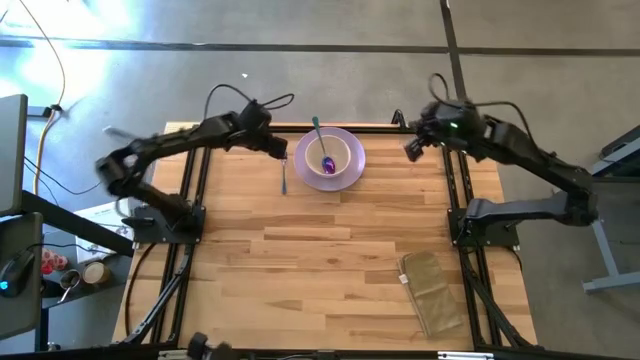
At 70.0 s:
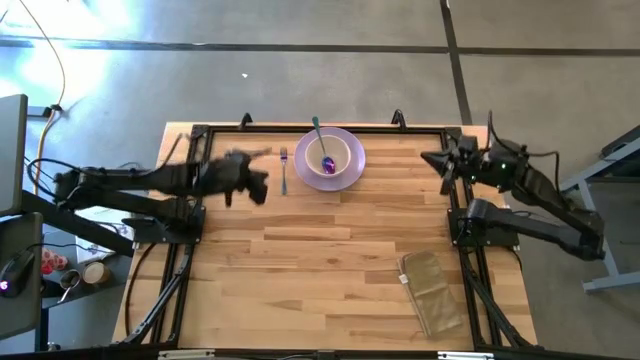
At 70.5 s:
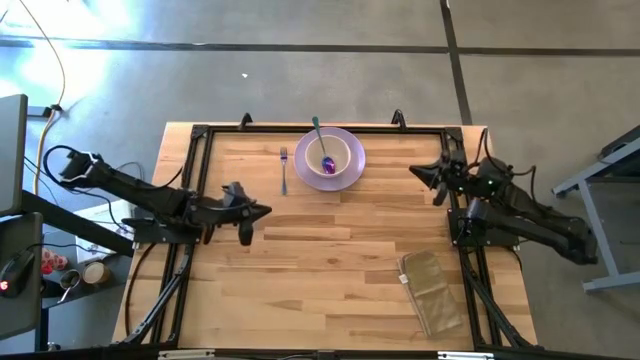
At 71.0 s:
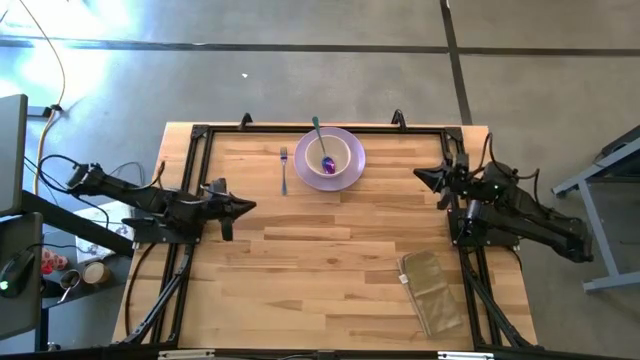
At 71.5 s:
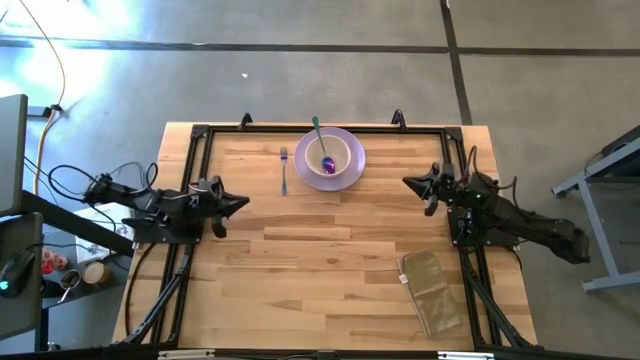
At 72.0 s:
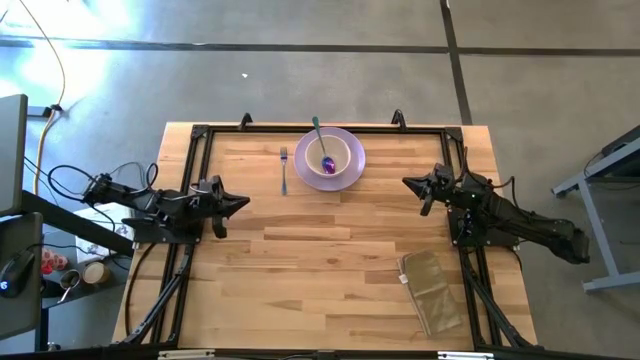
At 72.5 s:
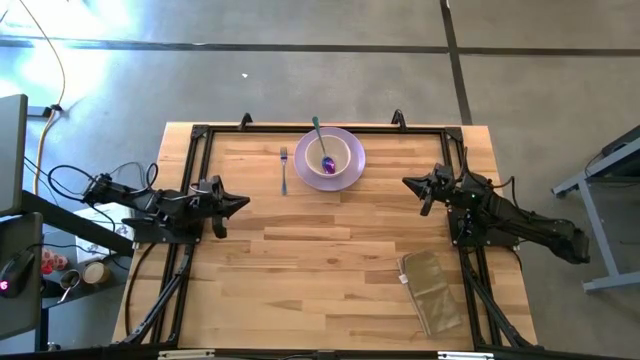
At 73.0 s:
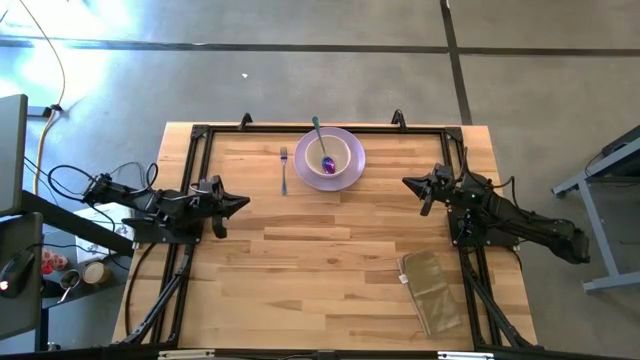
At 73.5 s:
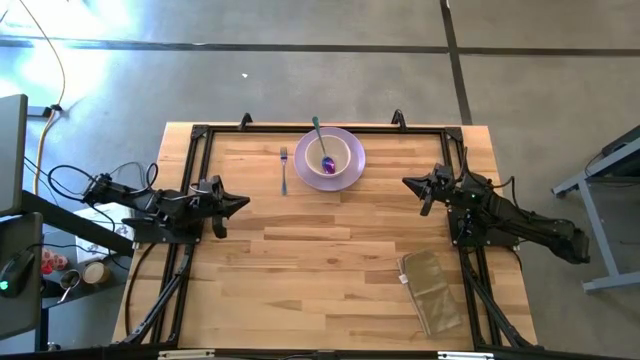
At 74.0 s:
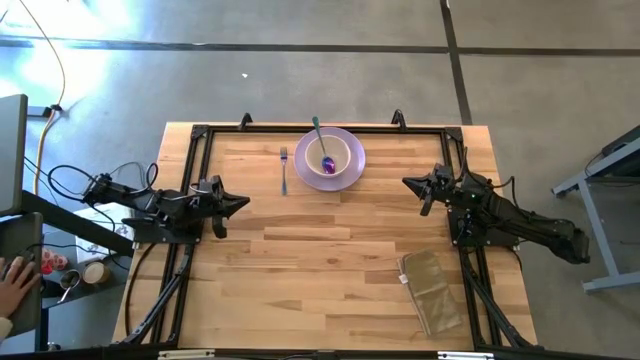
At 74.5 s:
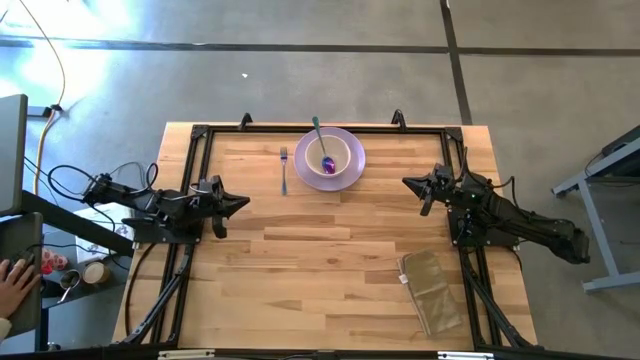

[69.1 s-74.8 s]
Task: Set table place
Return to Home Position

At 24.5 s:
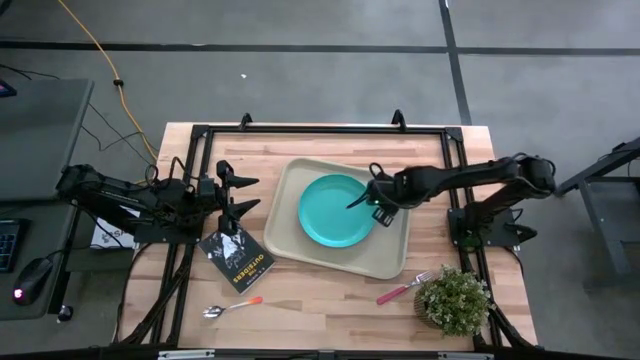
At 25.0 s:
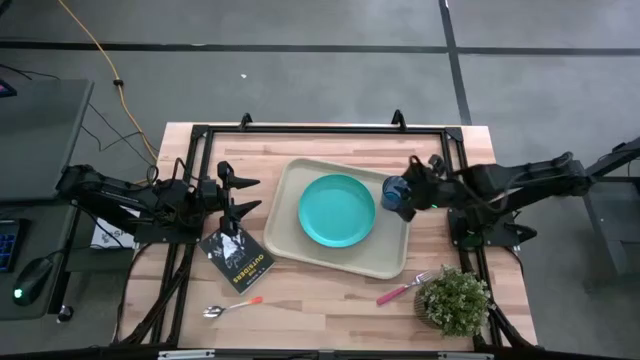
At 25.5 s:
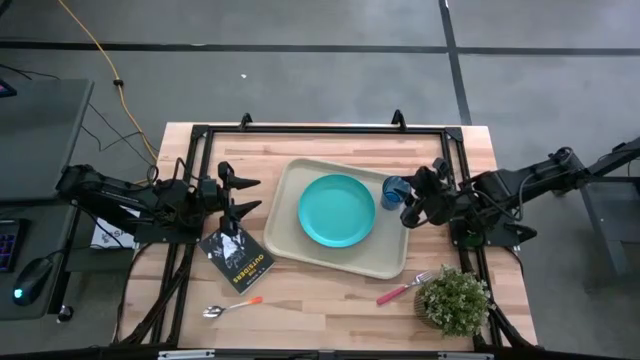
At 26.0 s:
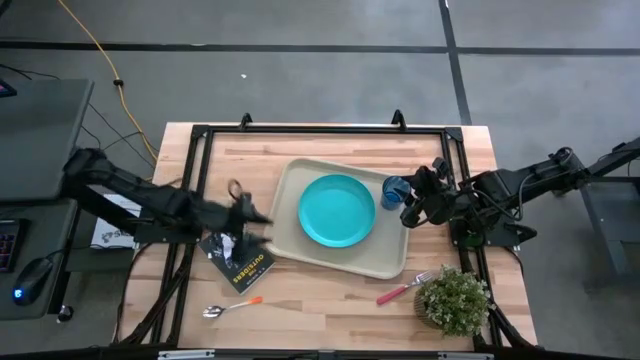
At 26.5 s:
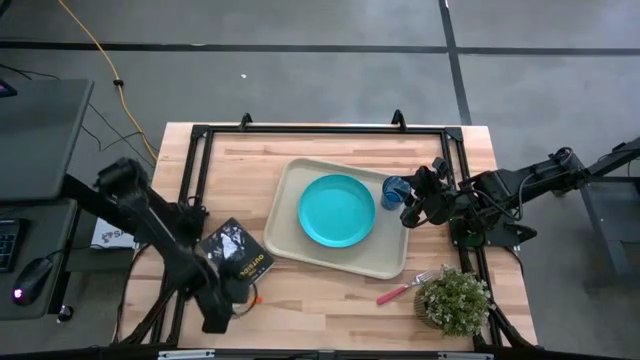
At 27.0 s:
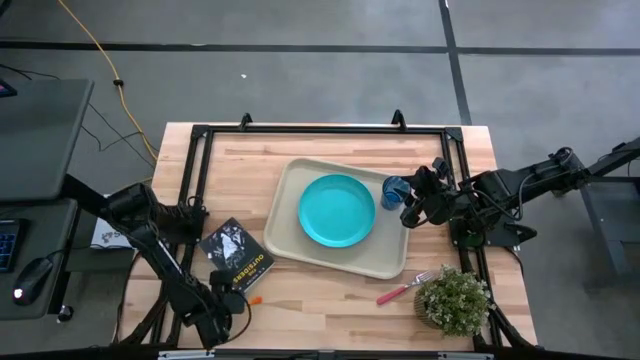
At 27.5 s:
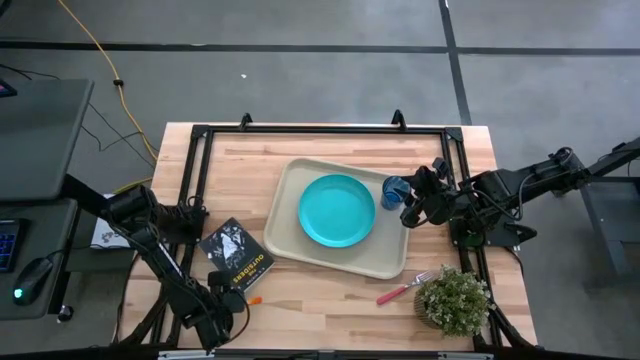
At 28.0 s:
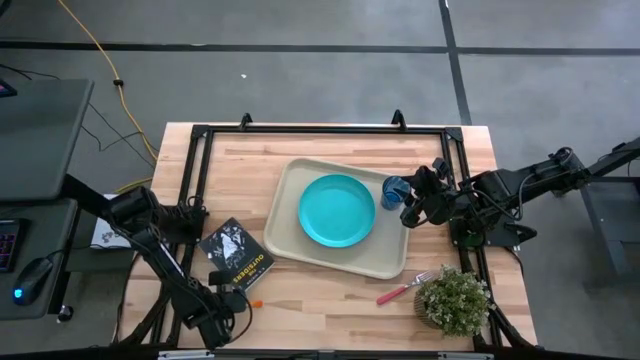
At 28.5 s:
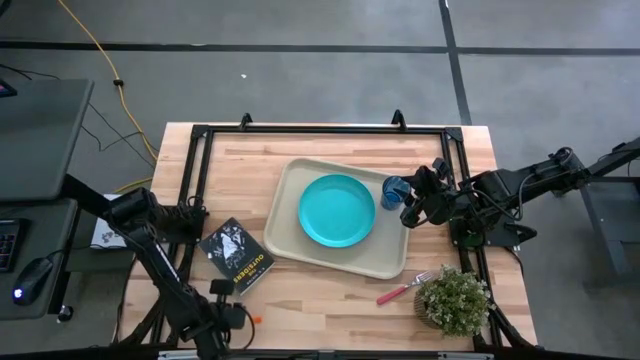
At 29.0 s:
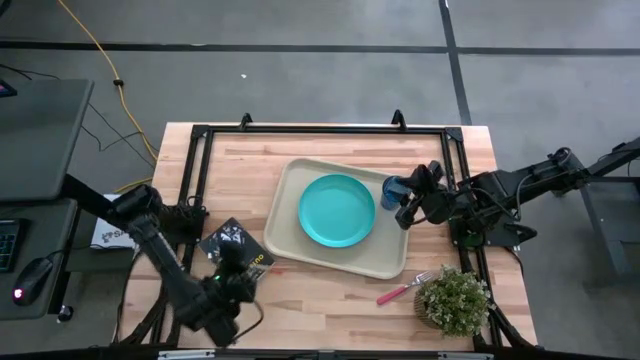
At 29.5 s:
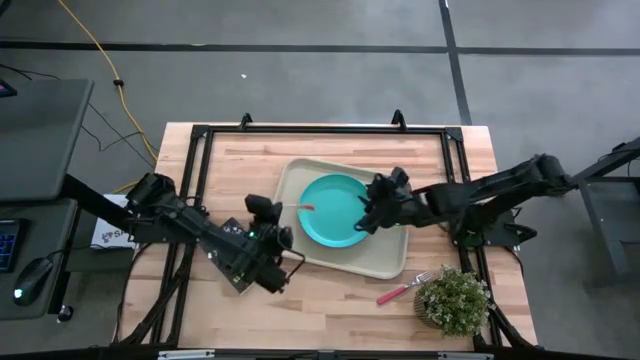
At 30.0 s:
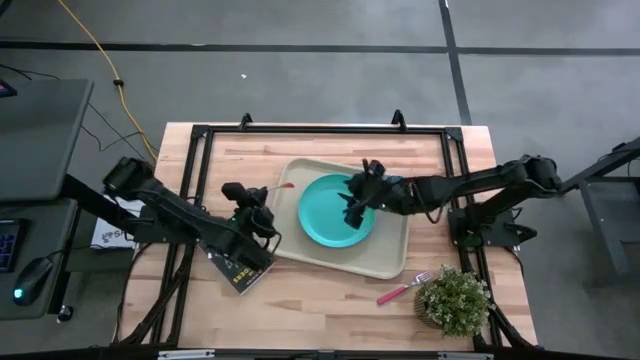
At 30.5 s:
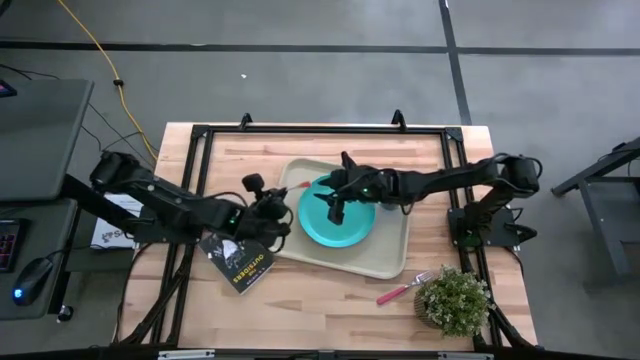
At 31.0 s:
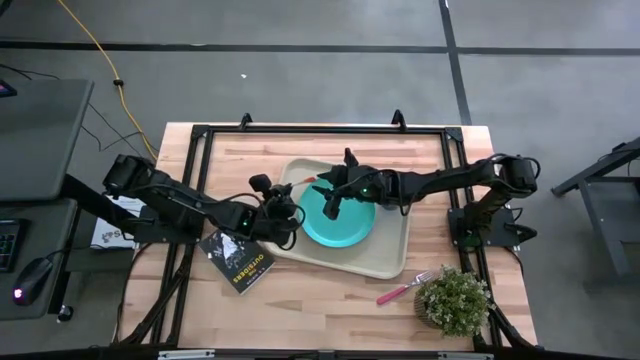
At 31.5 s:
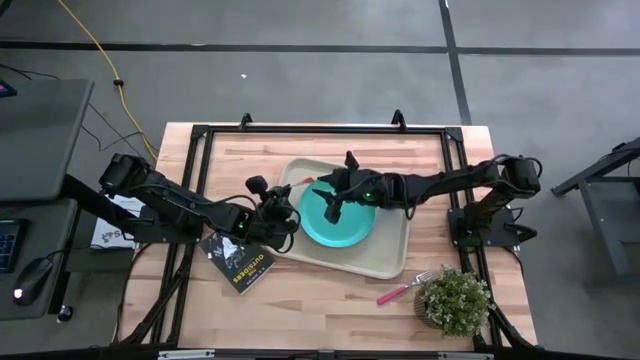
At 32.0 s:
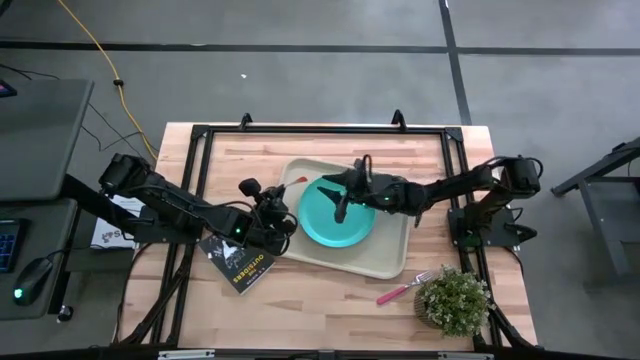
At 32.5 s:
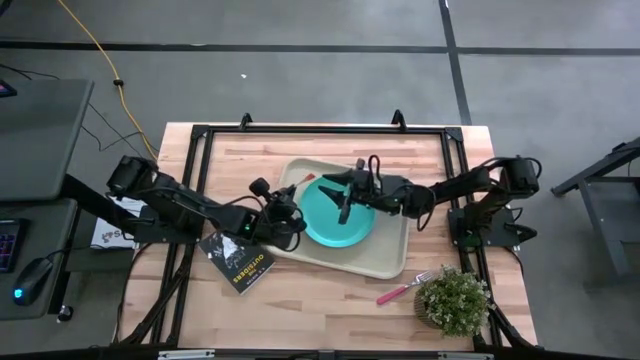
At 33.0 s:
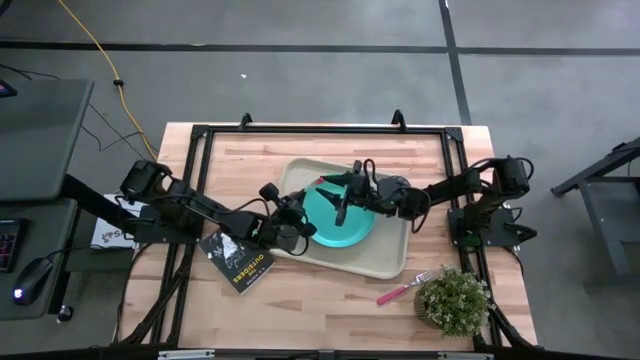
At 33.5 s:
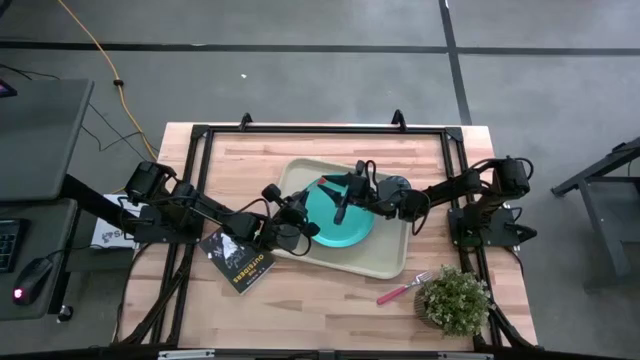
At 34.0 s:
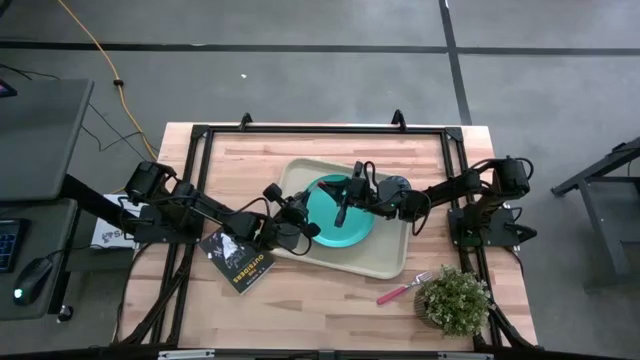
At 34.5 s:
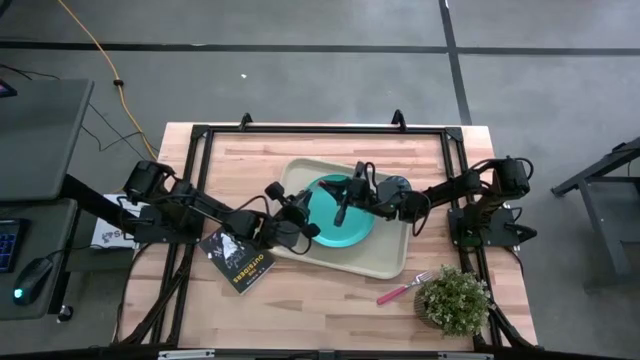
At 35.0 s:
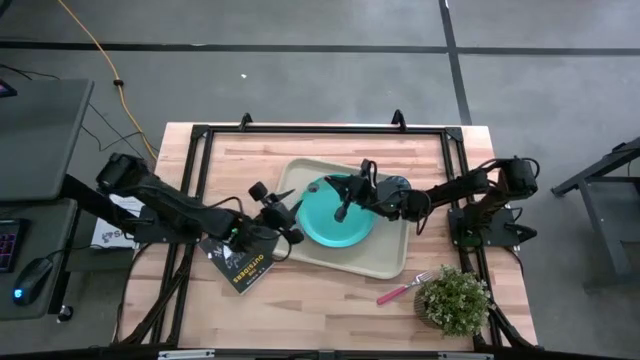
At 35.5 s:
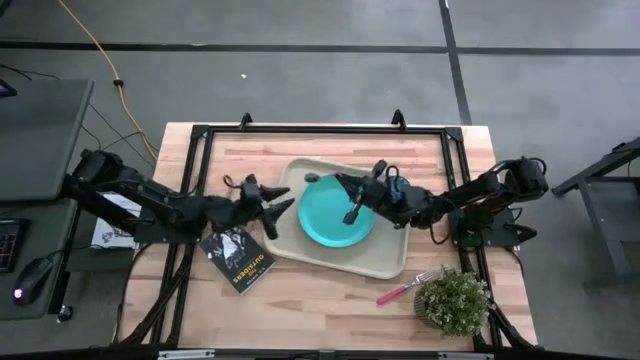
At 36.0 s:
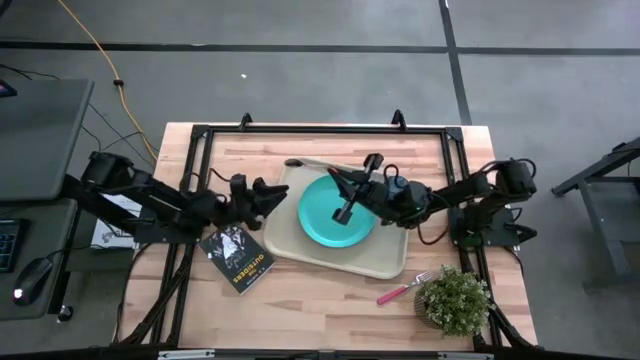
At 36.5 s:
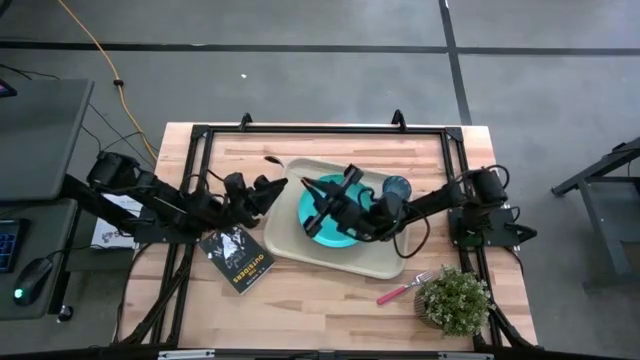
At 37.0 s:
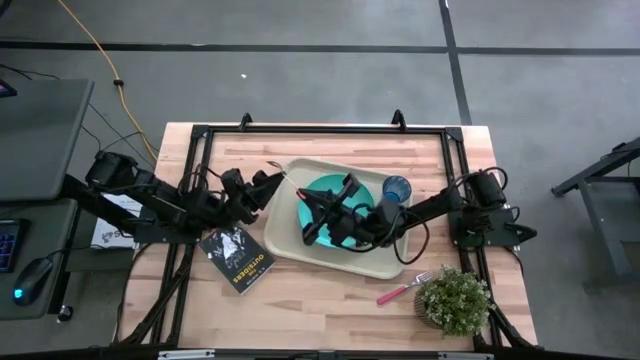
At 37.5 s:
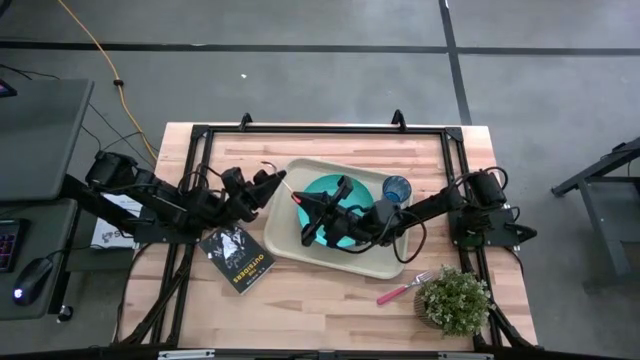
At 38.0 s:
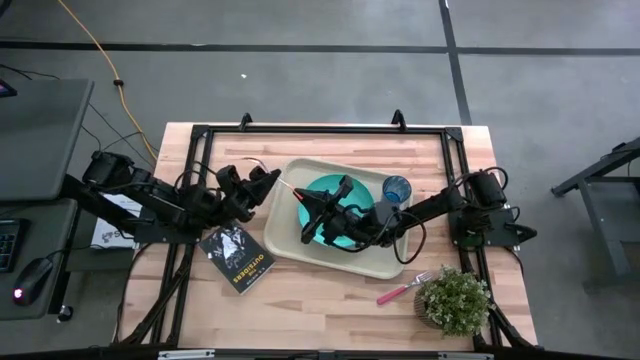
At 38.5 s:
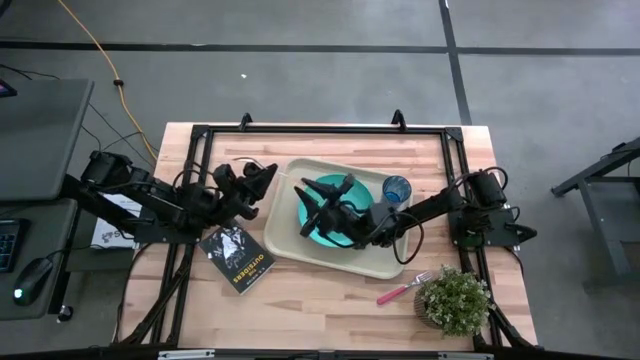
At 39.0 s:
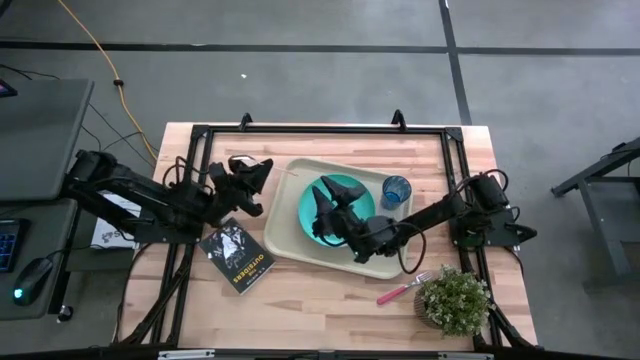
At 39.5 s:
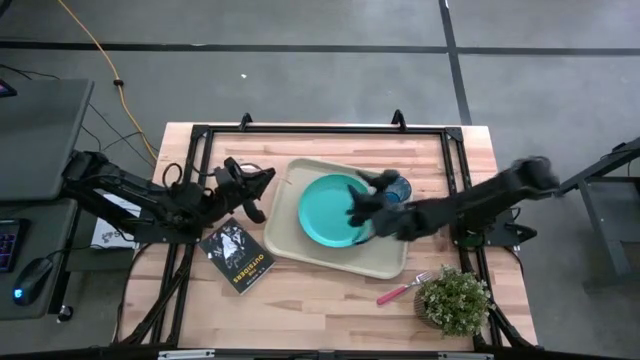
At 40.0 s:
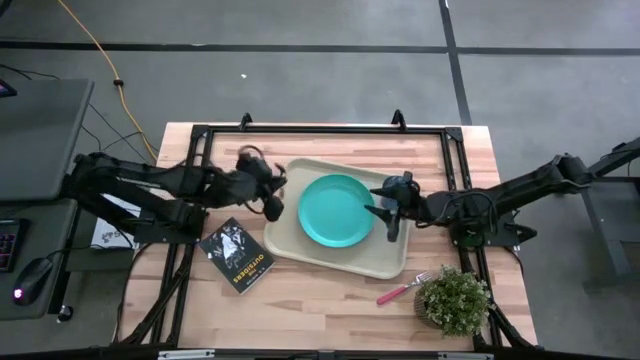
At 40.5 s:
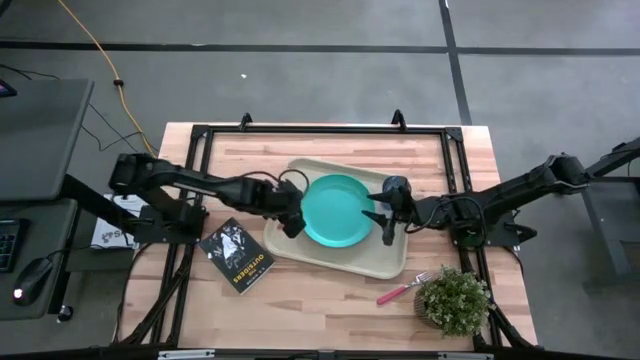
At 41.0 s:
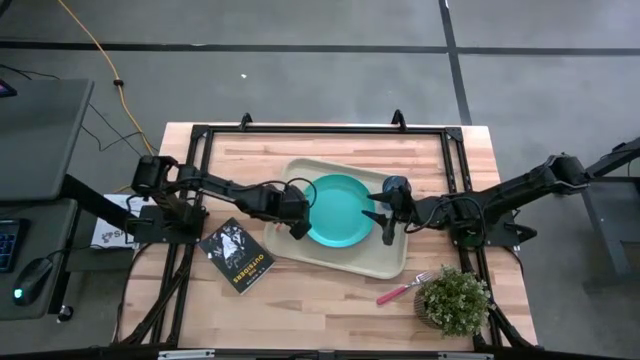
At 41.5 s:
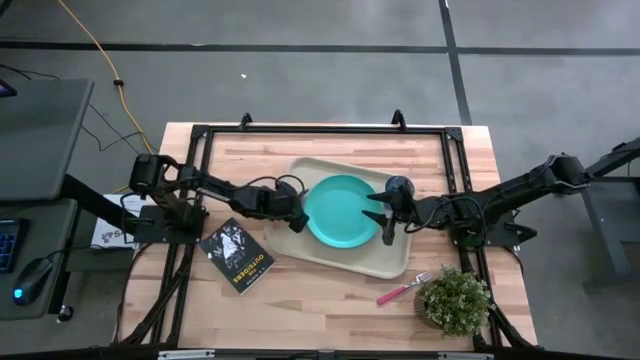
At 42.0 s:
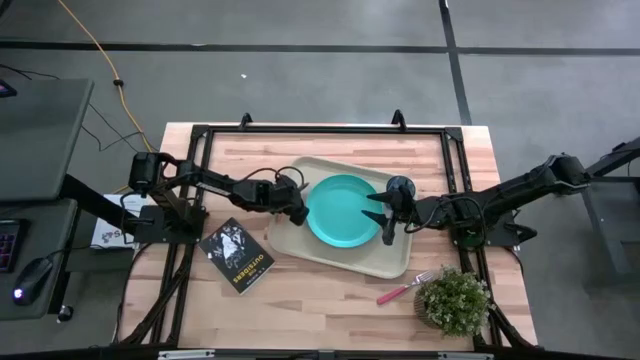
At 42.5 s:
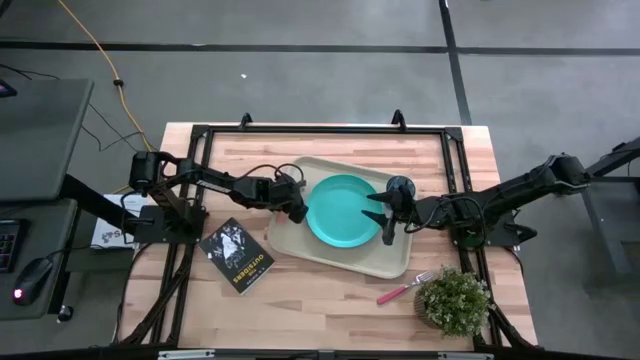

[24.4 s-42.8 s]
Task: Pick and place plate/cup/fork/spoon on tray
Put the orange spoon on the gray serving tray
